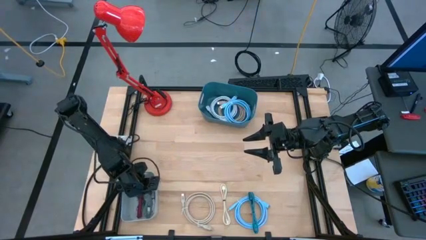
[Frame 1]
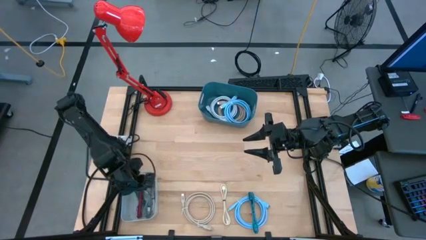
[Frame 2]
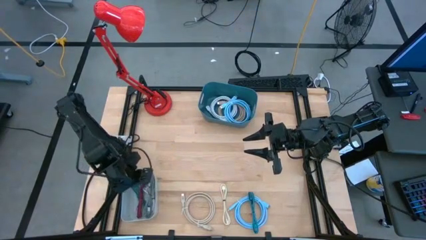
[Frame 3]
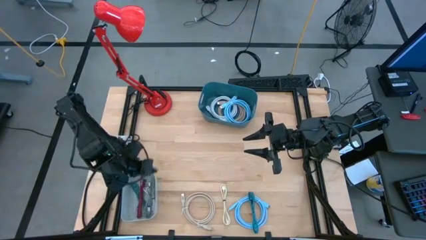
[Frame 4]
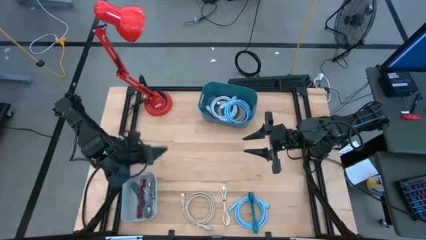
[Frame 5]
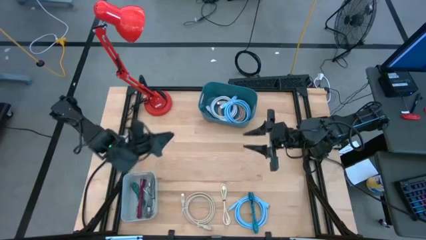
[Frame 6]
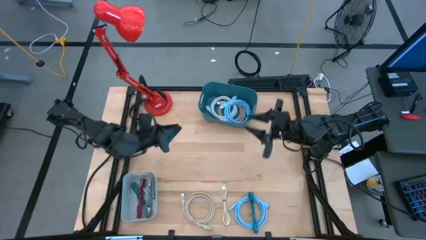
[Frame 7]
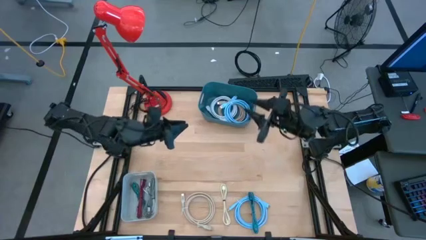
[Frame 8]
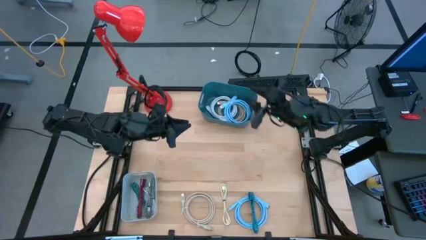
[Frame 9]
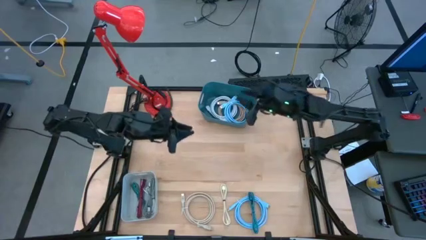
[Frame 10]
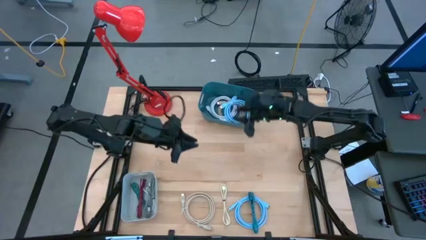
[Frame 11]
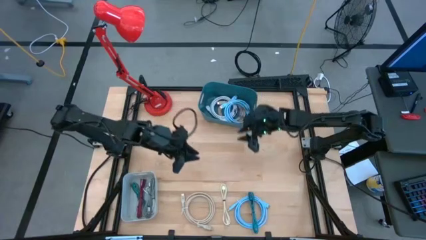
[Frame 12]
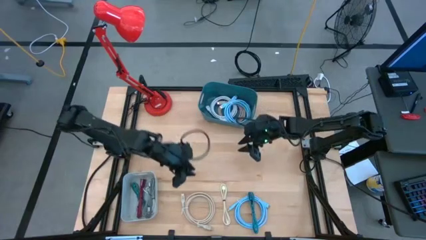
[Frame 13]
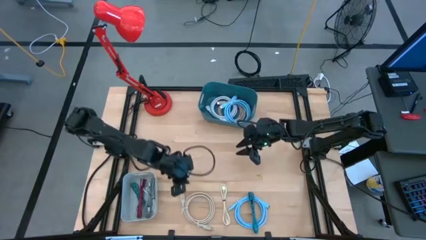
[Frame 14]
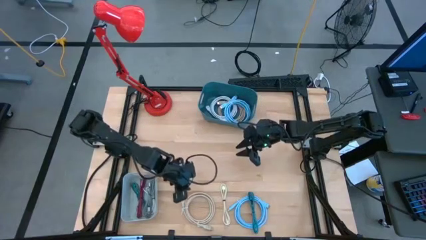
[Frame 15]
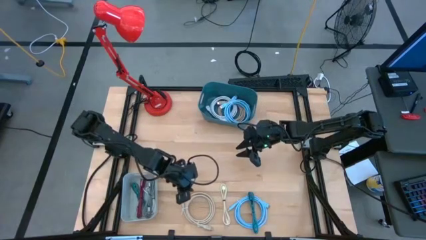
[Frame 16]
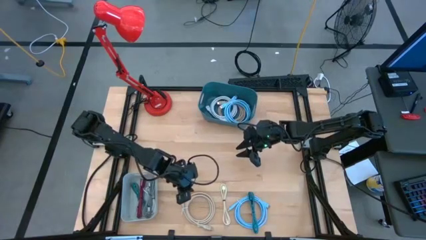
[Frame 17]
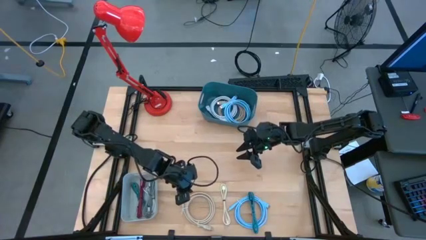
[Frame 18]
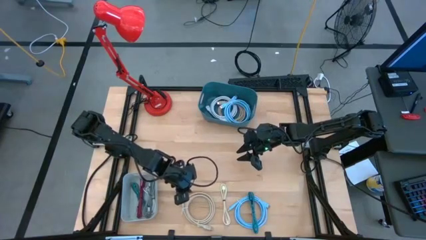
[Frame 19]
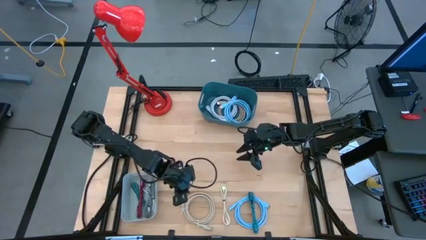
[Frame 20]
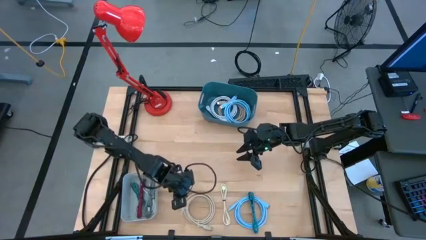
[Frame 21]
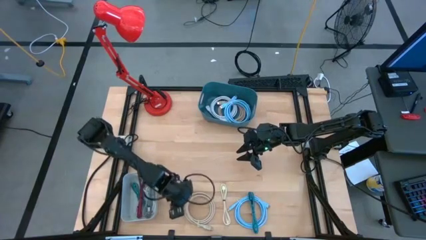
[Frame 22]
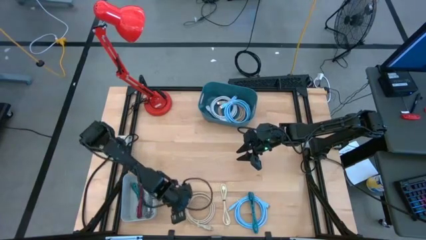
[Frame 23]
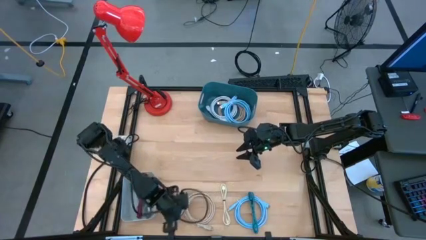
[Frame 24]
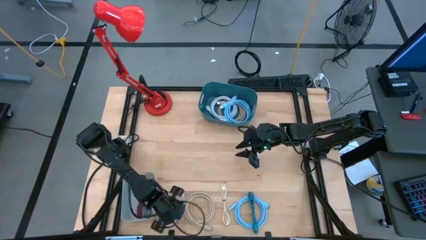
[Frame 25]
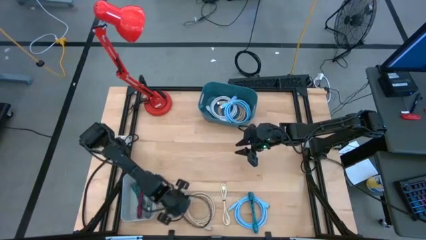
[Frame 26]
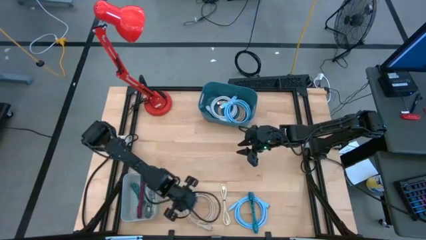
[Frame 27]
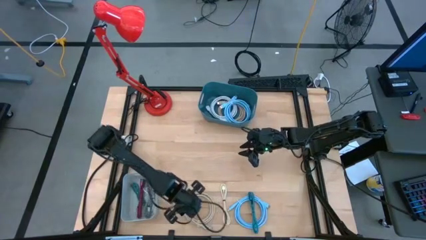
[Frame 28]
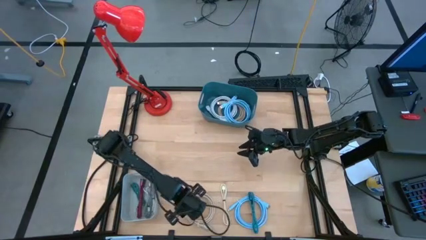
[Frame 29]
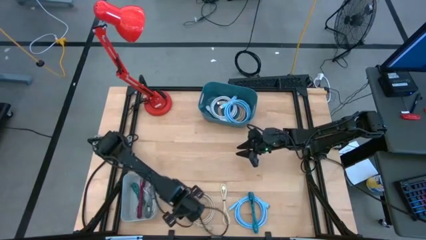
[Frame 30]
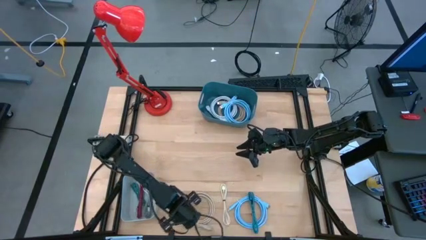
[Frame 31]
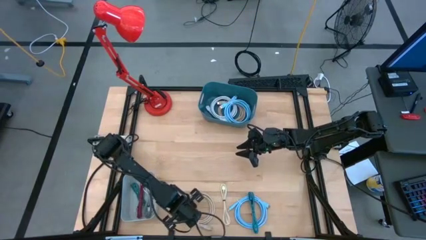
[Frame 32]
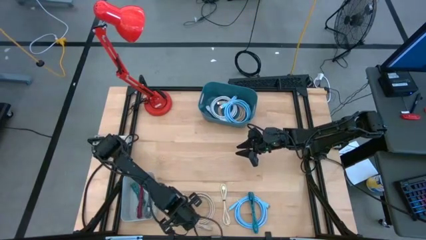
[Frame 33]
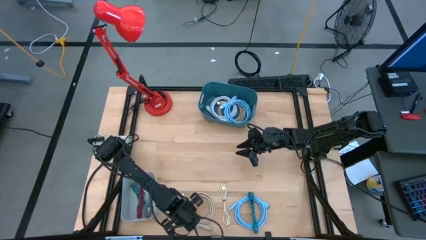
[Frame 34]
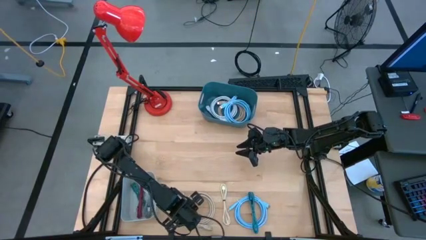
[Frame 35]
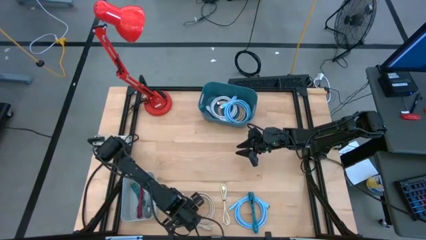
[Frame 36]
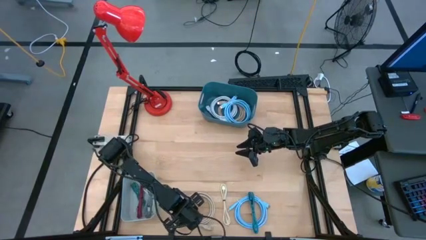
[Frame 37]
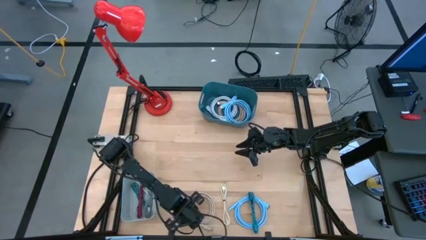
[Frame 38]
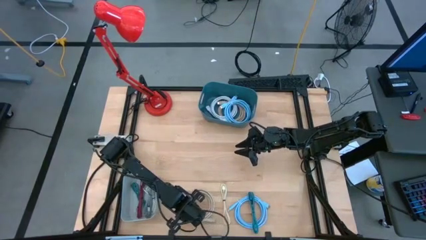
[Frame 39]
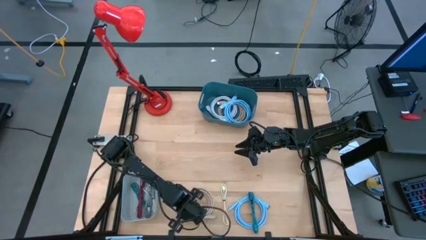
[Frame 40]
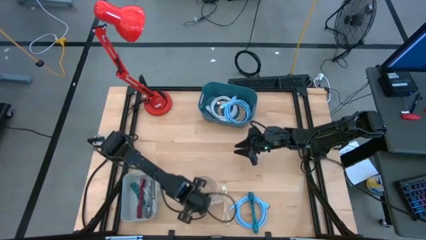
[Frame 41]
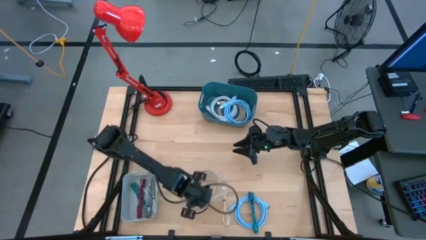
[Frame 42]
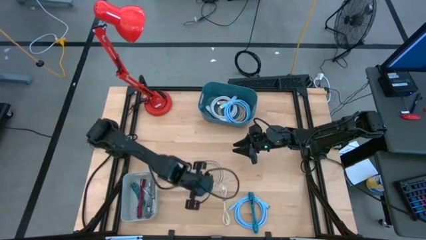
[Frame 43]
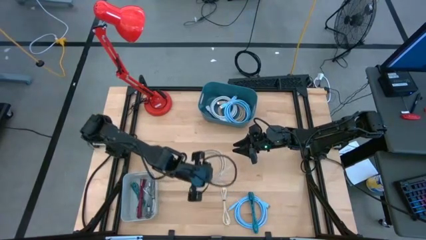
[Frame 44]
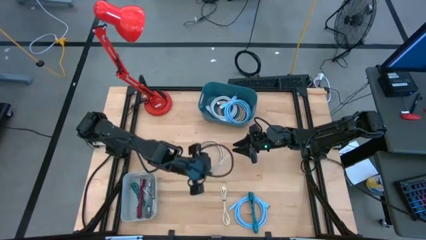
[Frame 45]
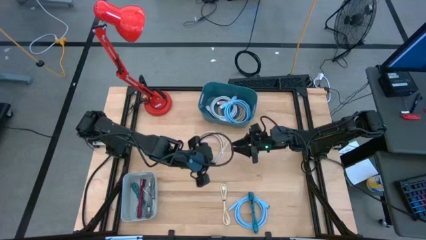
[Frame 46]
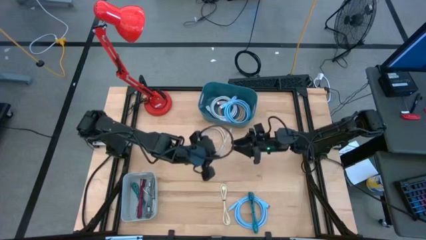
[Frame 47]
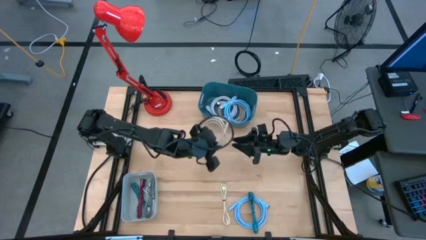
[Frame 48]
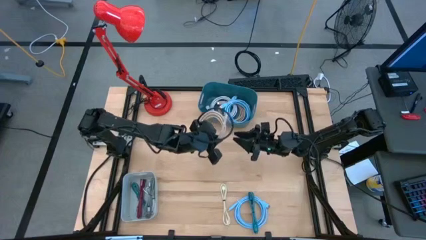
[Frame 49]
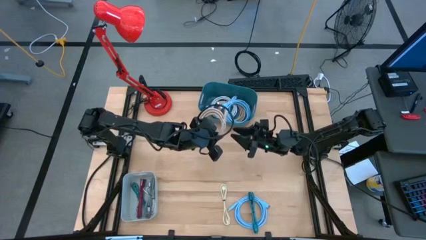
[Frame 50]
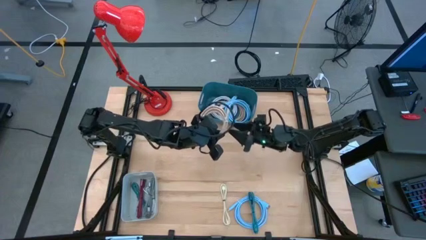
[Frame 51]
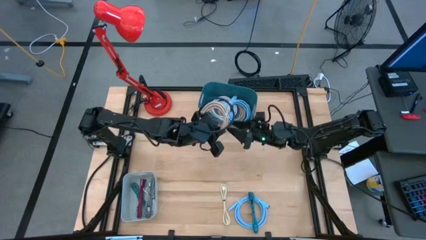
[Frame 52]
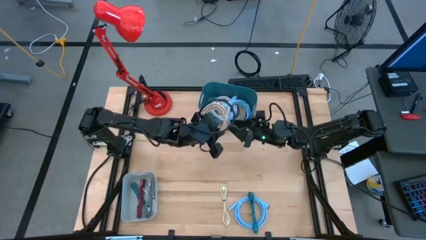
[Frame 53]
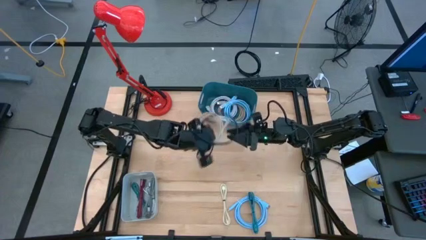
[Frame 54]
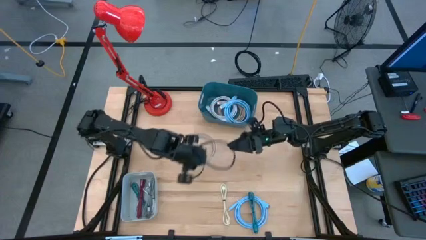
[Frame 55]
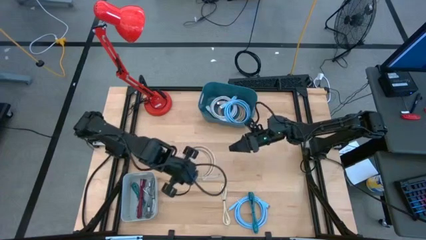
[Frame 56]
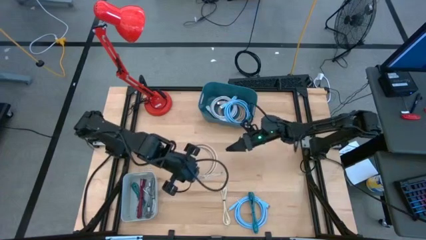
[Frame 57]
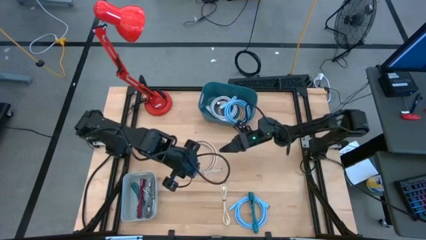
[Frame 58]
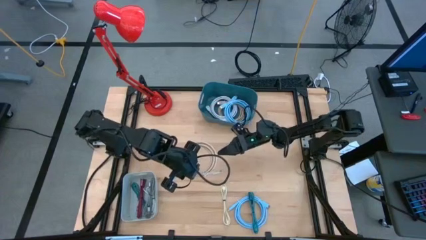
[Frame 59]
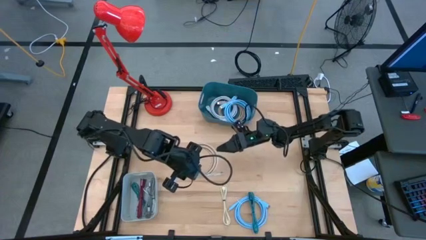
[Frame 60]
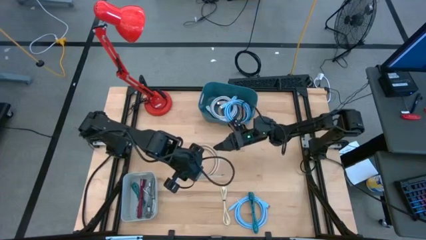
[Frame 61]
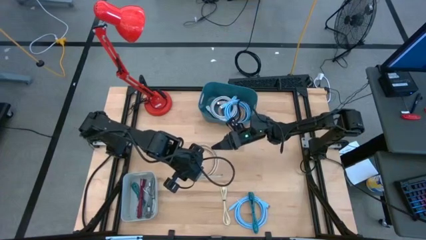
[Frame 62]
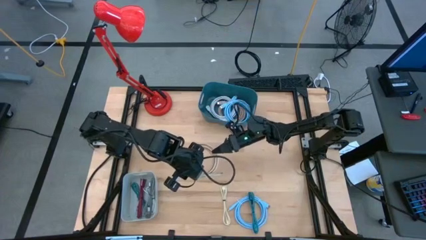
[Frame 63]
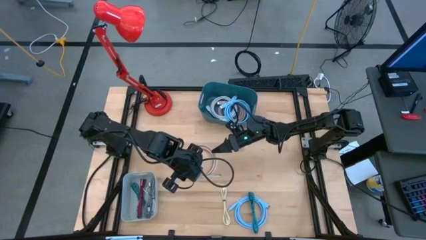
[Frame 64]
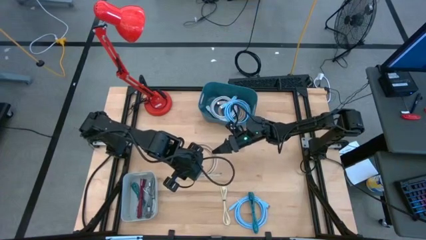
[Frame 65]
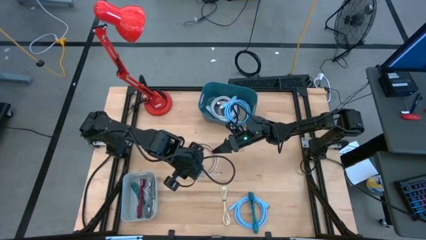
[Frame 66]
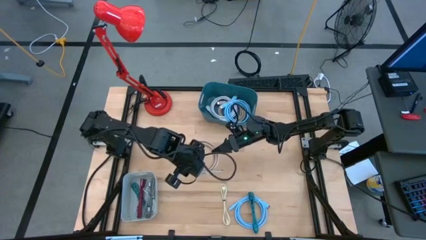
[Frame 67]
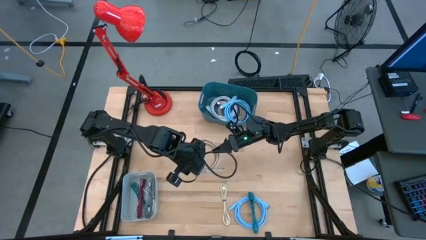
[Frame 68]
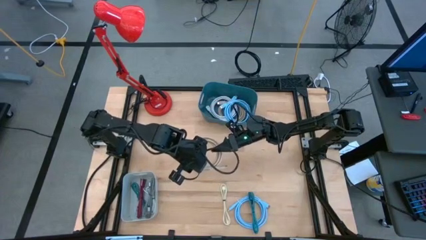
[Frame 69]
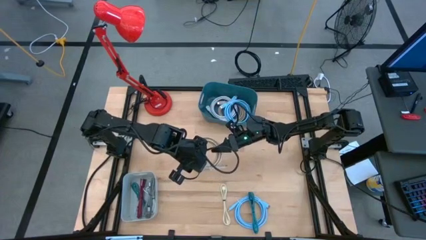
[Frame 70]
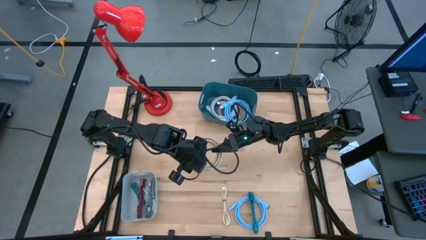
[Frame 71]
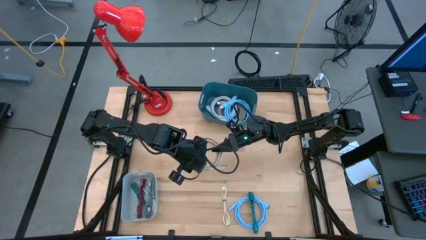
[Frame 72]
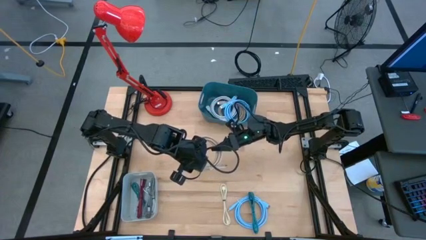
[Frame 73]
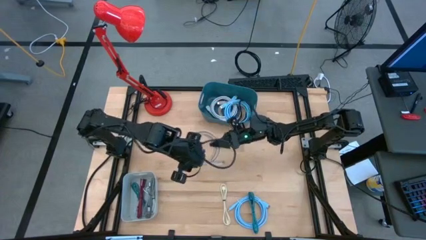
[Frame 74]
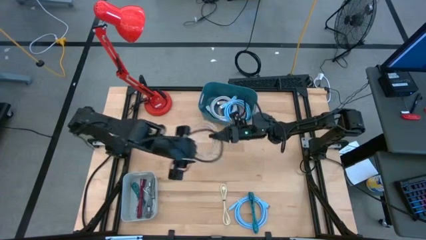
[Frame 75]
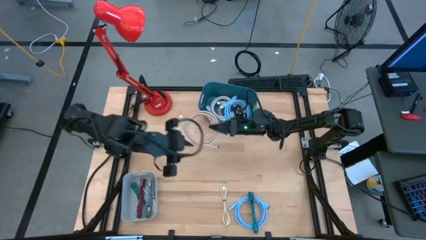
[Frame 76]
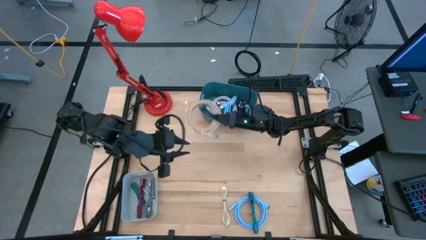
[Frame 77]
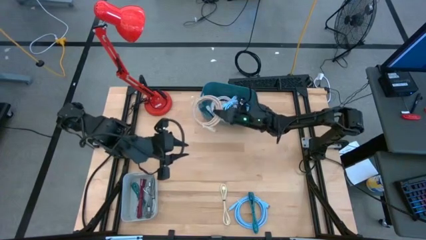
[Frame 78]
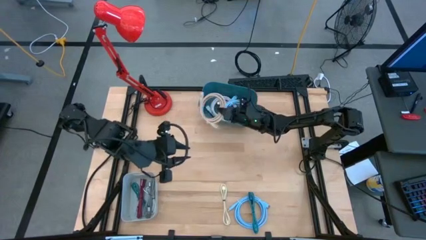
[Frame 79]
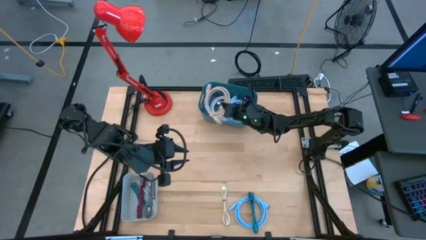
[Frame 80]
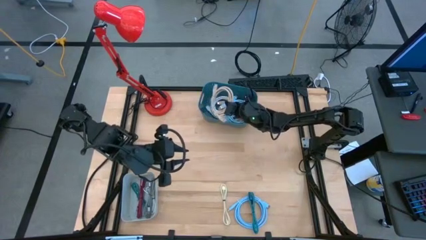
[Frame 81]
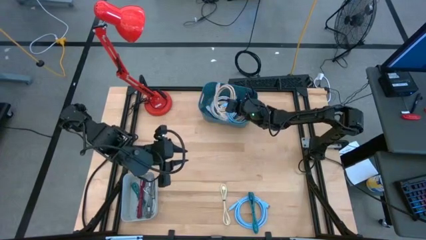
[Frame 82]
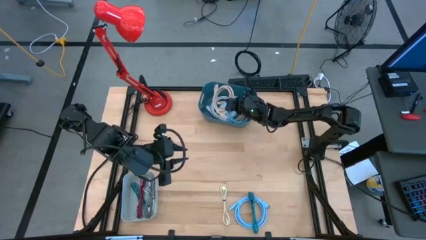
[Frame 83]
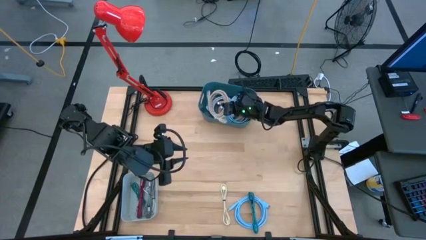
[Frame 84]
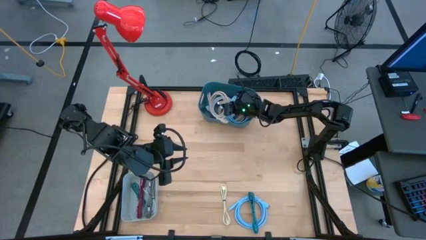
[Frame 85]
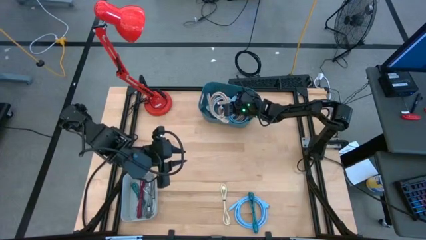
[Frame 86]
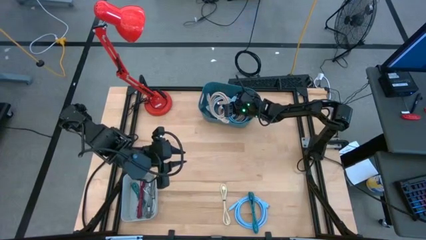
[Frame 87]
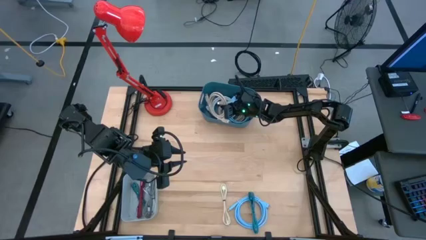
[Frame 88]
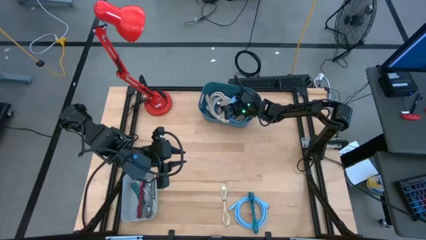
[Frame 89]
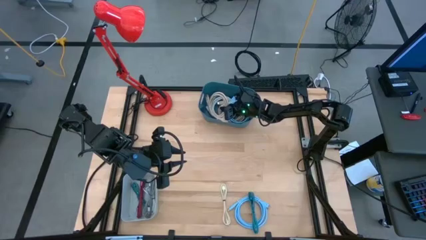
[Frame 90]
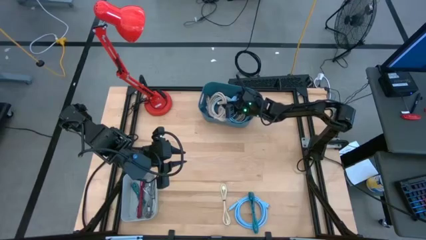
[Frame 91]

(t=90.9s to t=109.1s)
Task: Pick & Place USB Port
Put the brown wire cable into the blue bin
